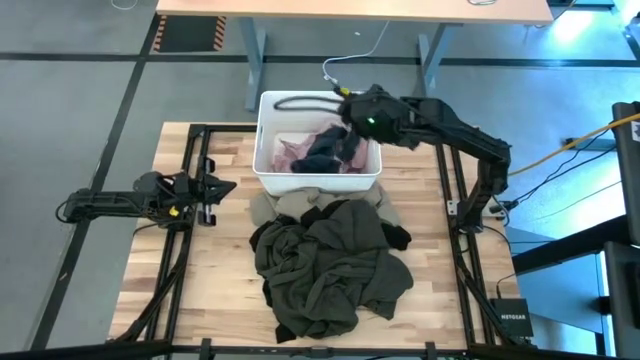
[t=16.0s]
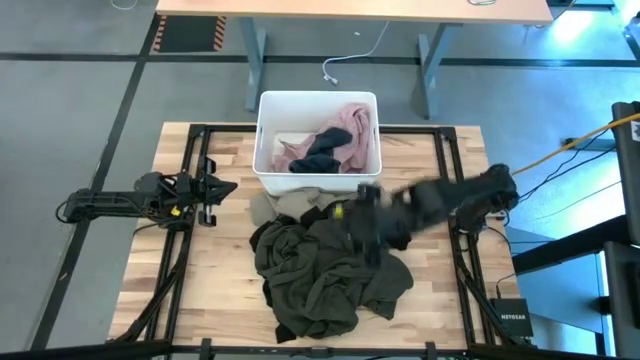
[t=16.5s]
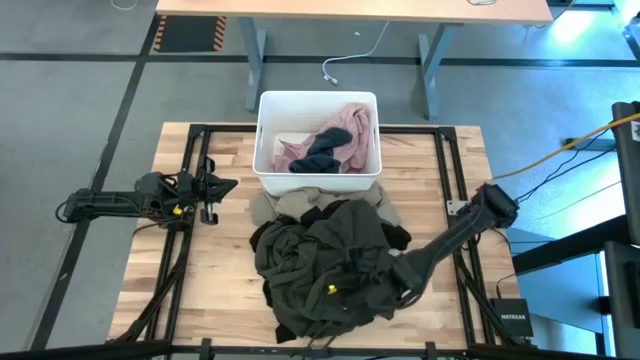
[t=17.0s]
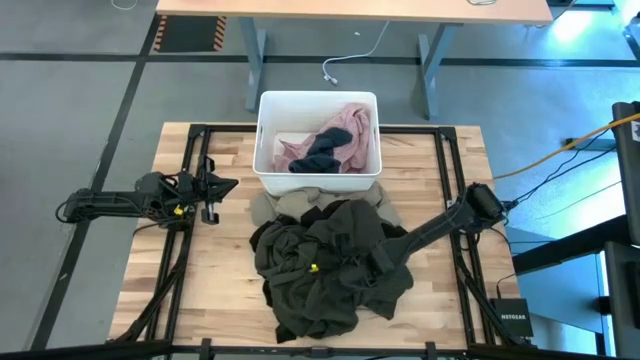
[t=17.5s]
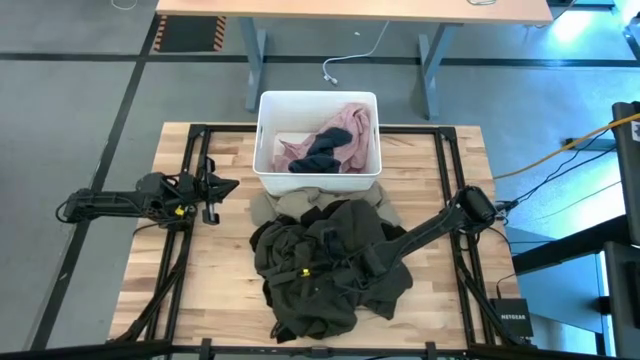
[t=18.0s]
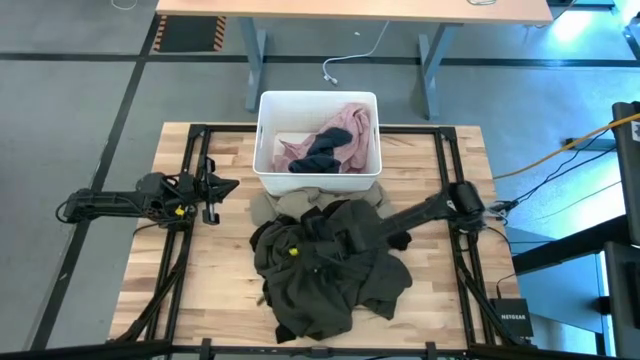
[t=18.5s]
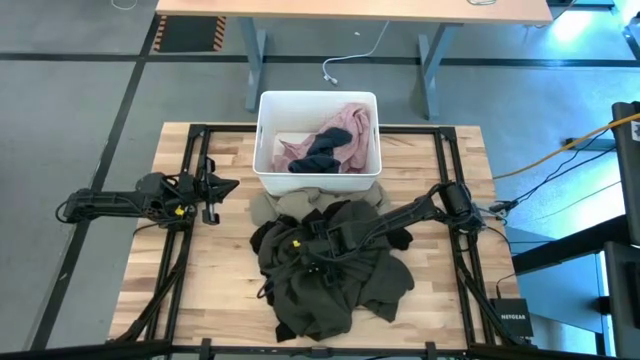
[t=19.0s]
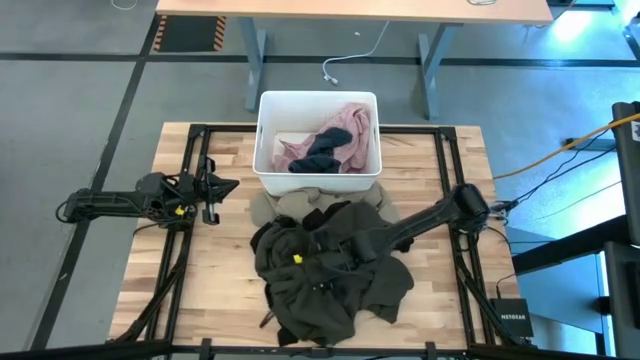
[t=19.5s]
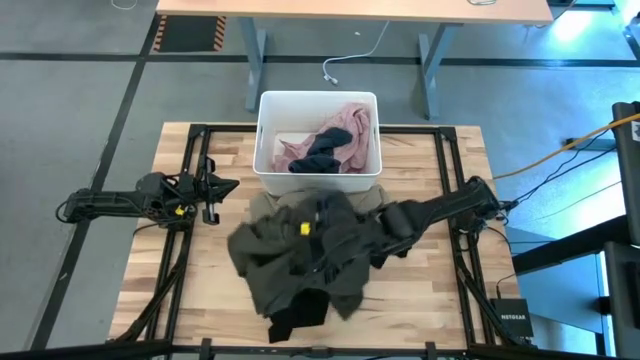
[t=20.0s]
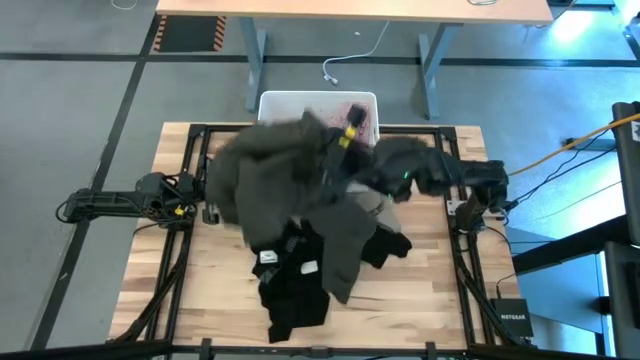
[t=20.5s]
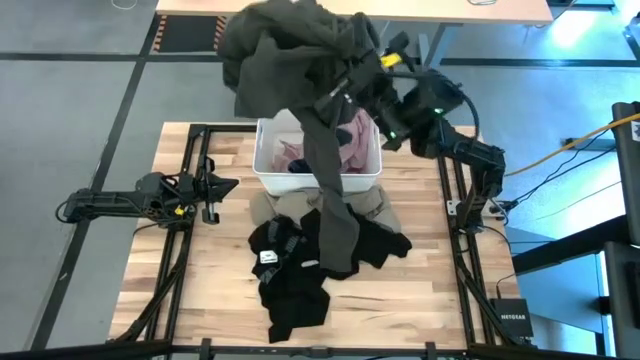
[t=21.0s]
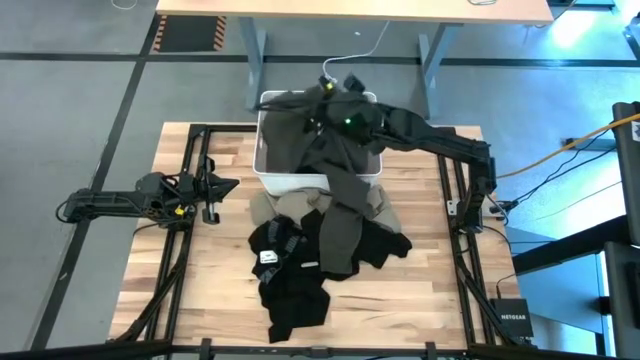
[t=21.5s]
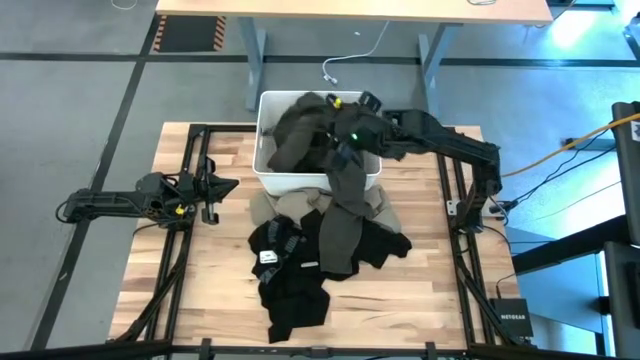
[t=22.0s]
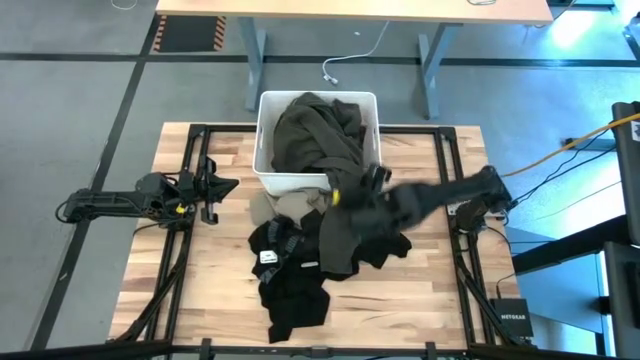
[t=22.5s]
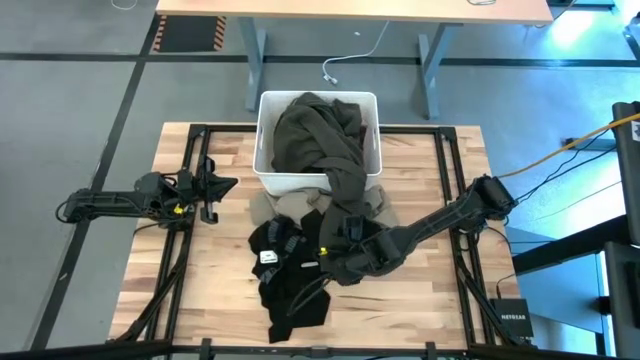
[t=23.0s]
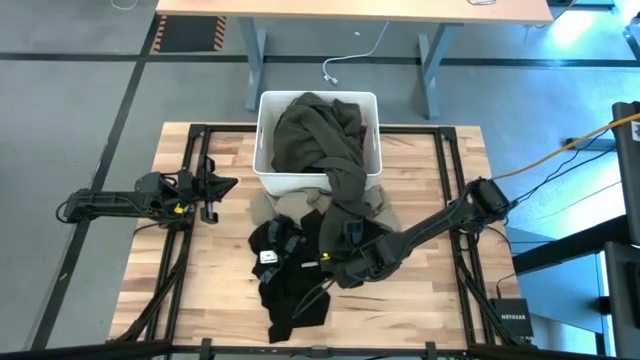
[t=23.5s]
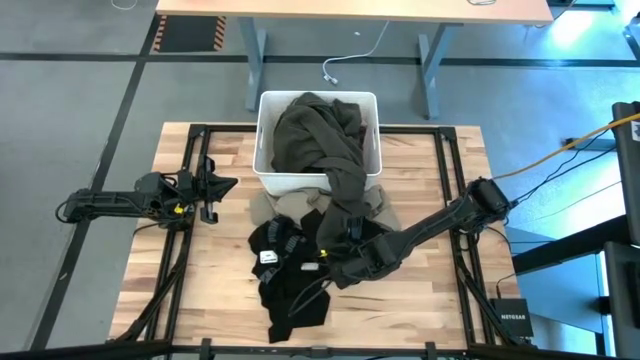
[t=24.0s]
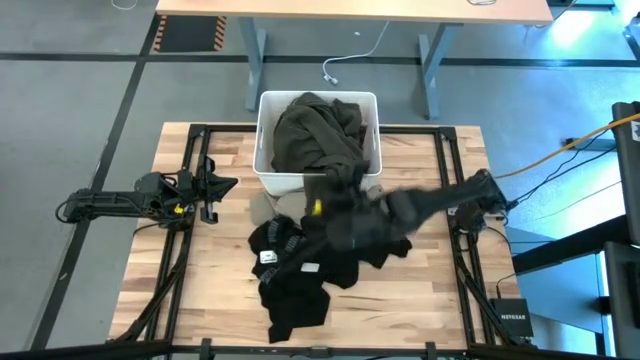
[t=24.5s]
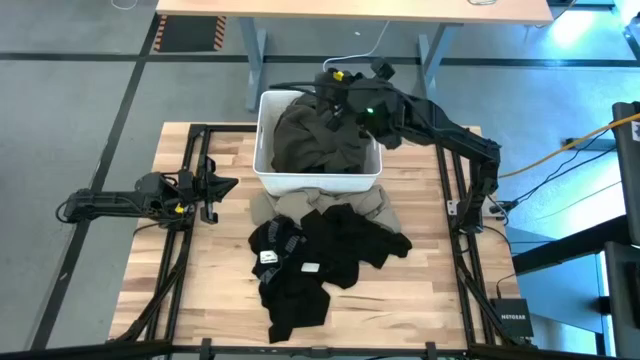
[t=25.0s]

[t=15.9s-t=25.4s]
Task: Sort clothes
Put the black hoodie into the white bin

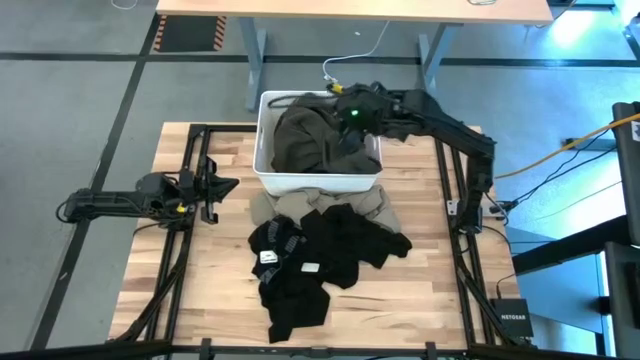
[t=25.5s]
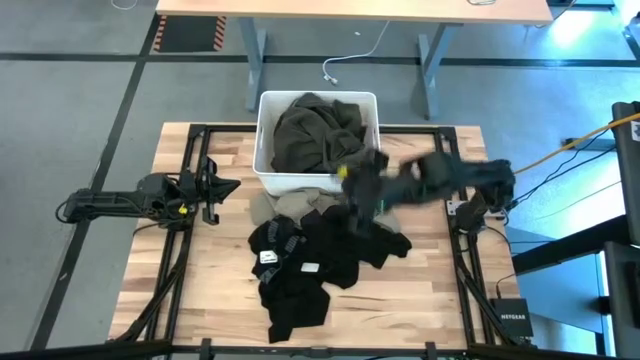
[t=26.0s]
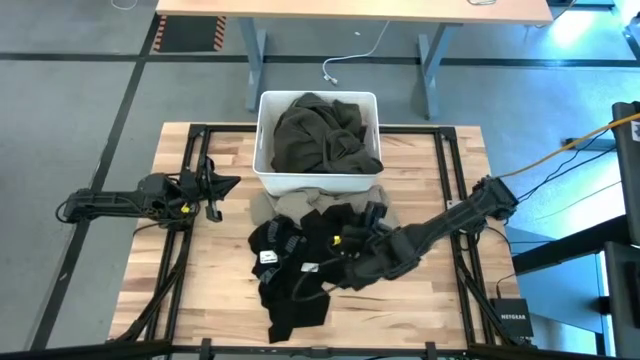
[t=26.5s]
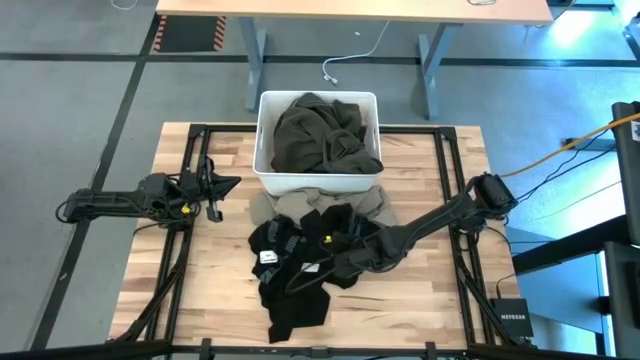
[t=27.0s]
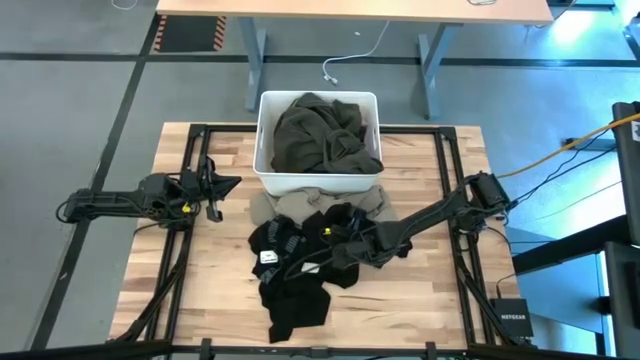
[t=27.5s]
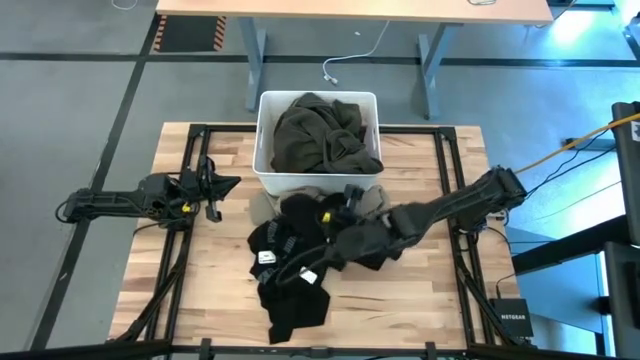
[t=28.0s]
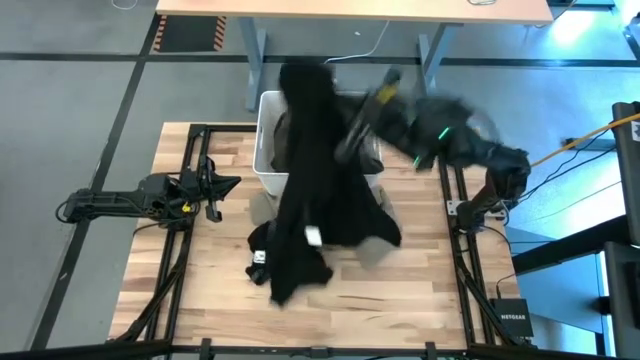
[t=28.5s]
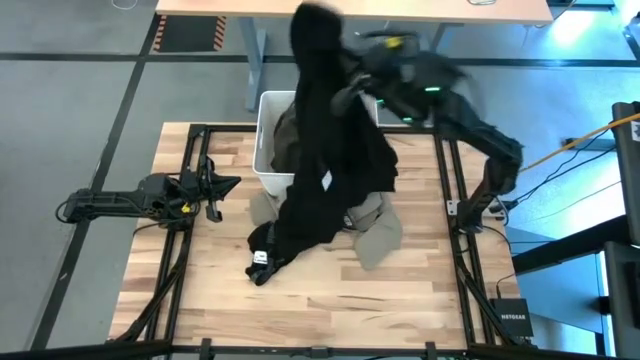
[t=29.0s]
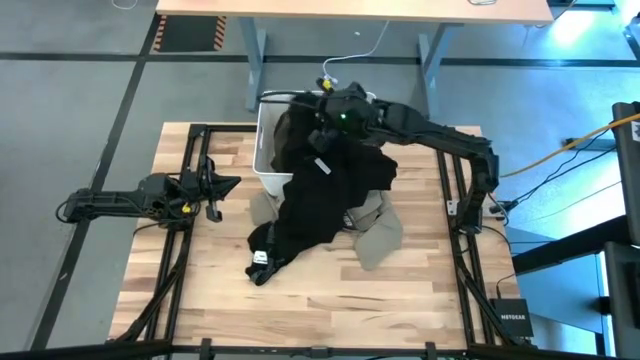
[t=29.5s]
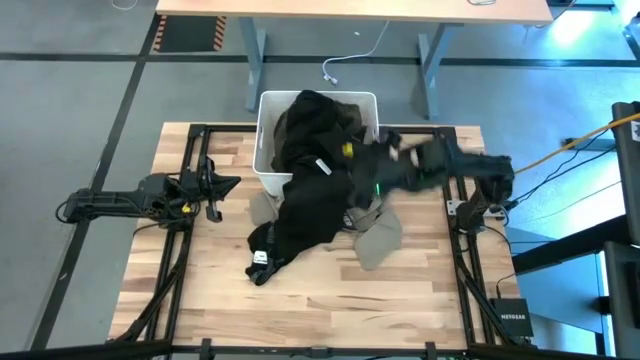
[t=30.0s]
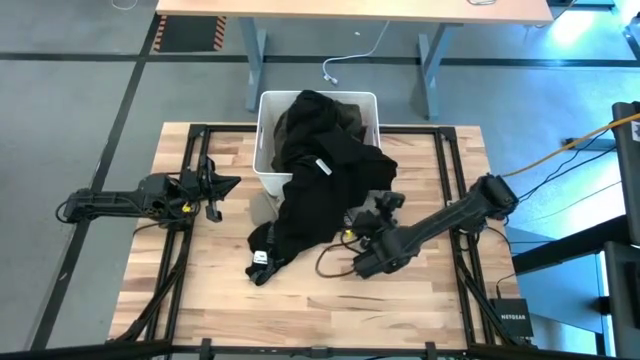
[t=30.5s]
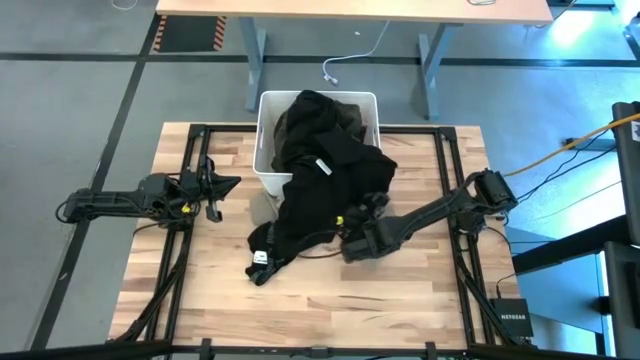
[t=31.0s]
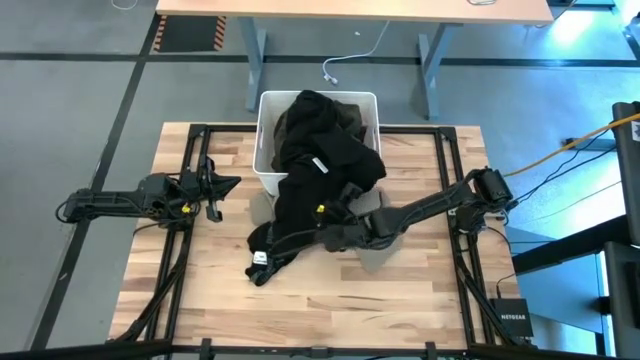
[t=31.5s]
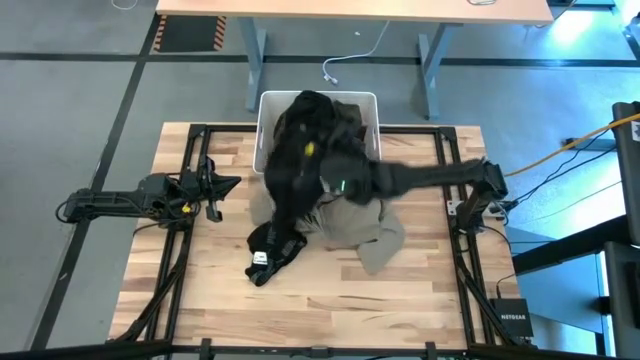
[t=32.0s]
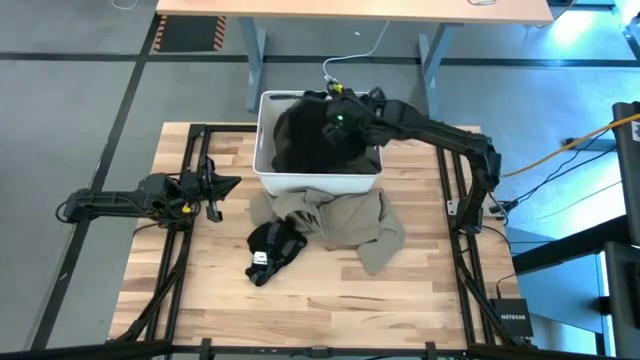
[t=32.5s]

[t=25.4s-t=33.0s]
Put the black shirt into the white bin

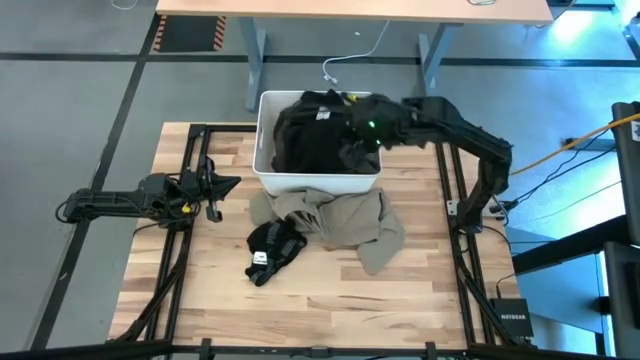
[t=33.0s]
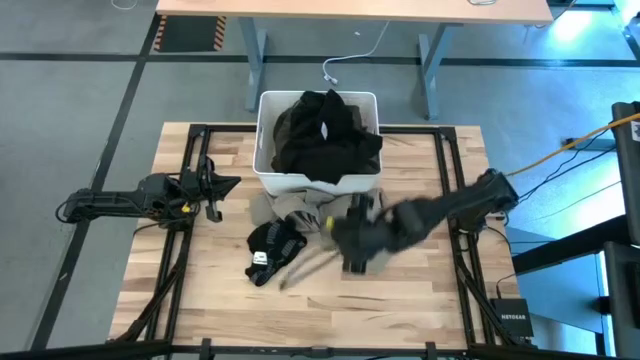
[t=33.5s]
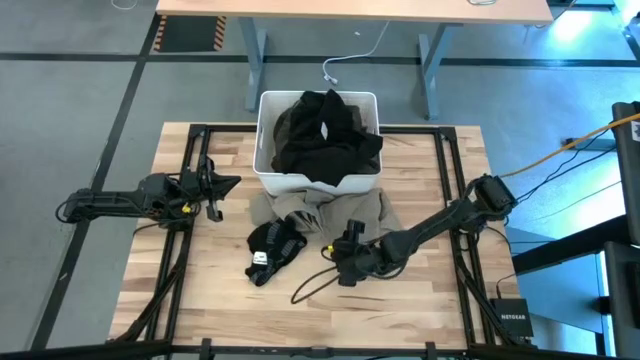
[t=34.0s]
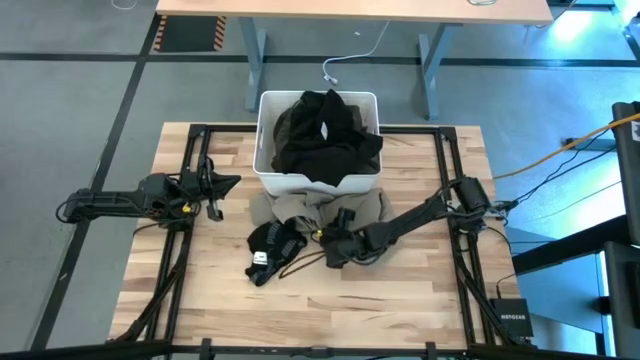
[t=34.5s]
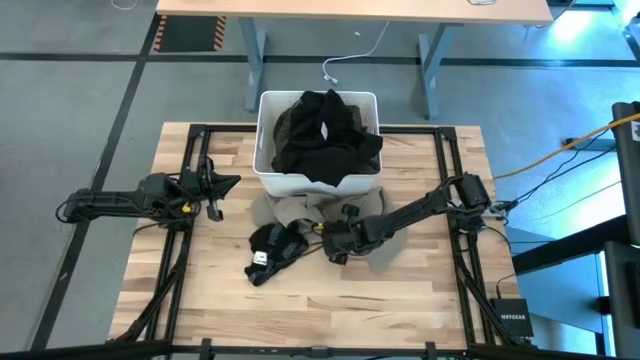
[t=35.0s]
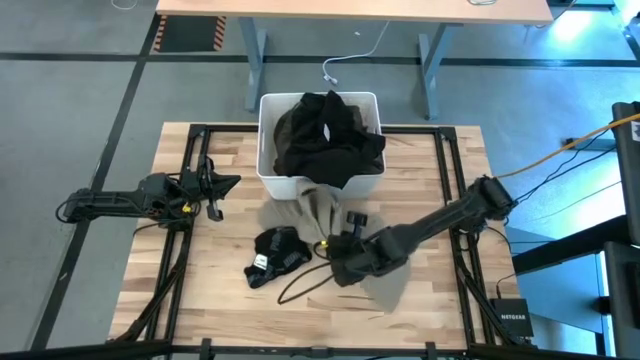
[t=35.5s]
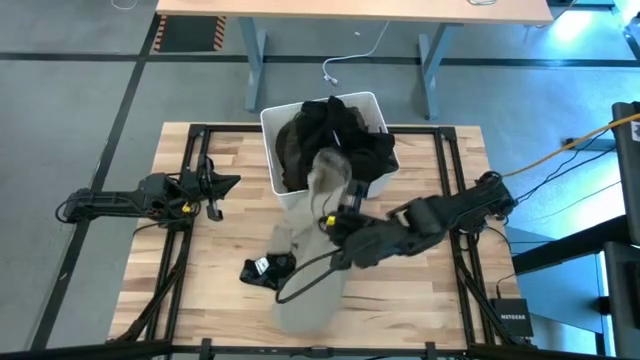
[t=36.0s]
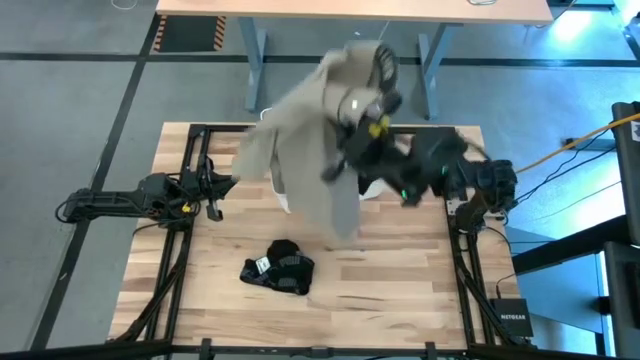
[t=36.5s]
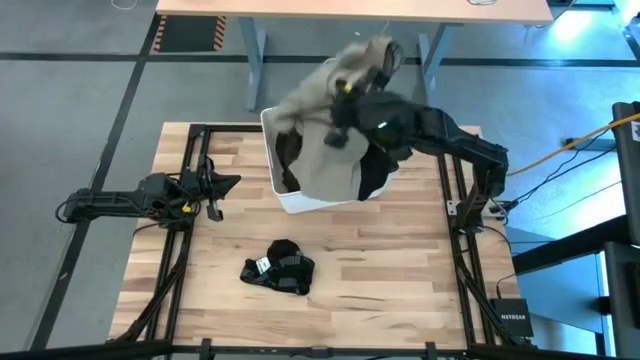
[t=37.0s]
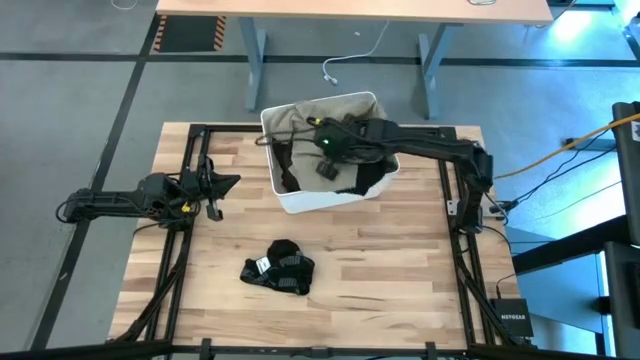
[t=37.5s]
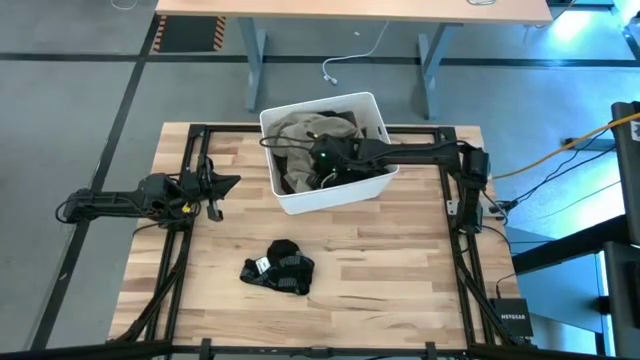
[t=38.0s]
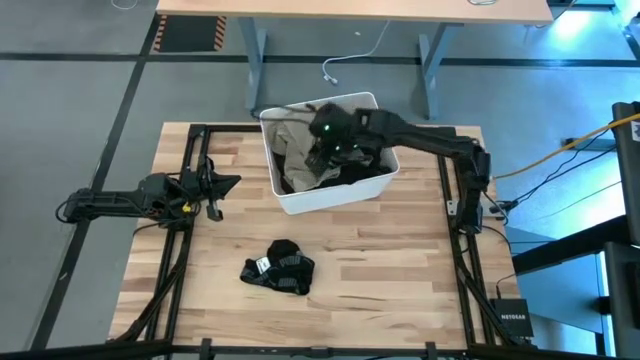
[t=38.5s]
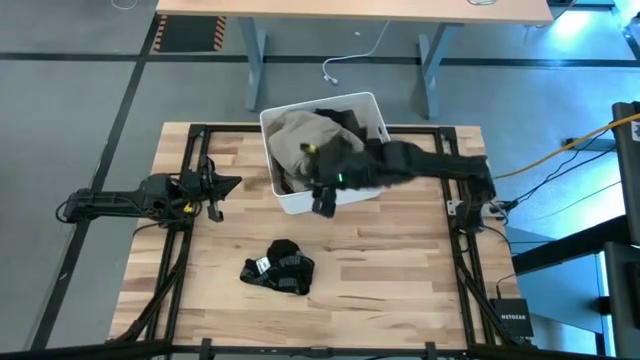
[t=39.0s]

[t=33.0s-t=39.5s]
Put the brown short into the white bin
